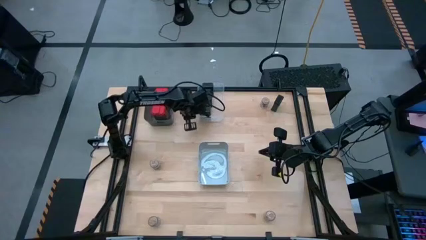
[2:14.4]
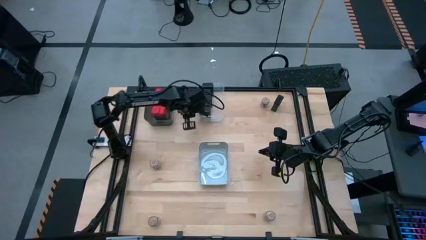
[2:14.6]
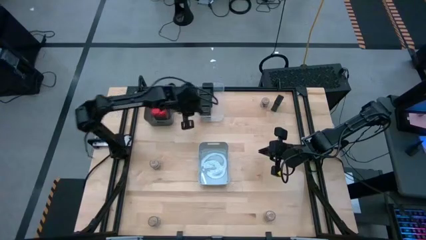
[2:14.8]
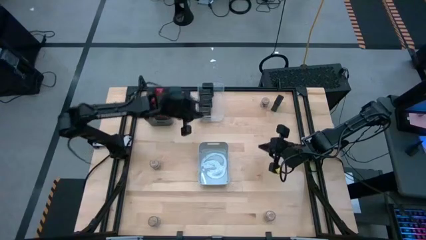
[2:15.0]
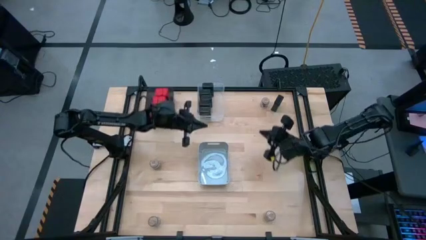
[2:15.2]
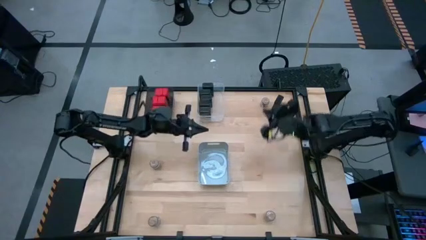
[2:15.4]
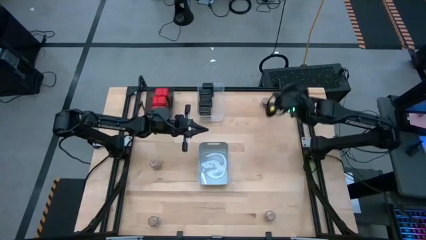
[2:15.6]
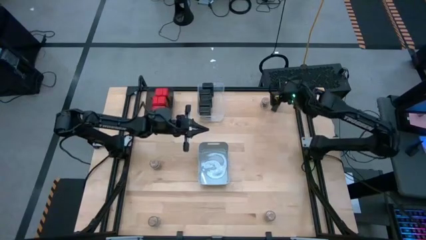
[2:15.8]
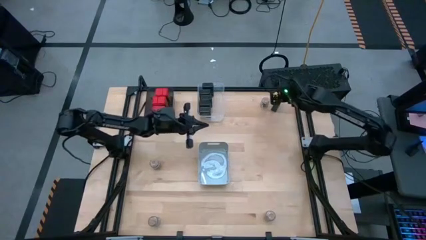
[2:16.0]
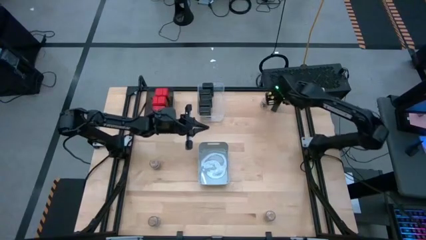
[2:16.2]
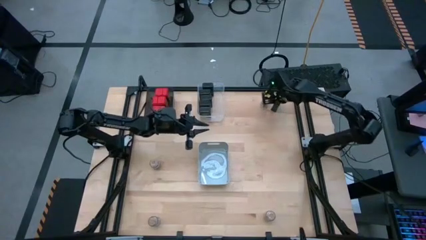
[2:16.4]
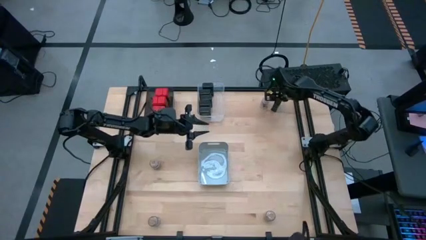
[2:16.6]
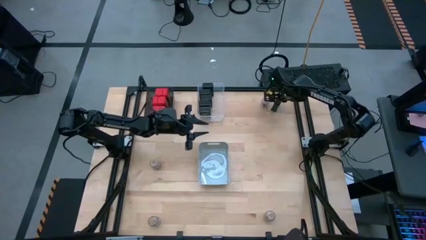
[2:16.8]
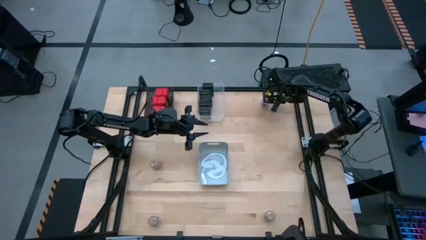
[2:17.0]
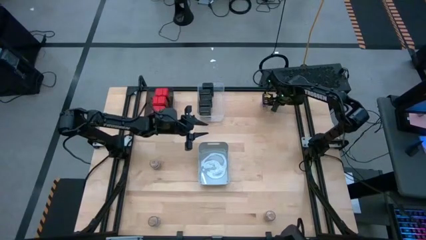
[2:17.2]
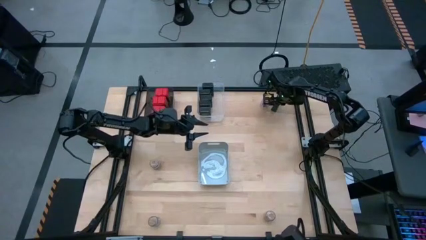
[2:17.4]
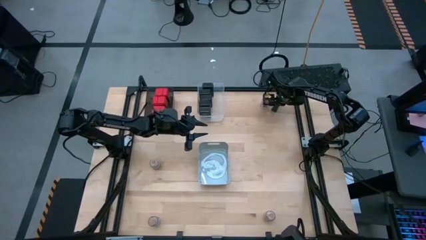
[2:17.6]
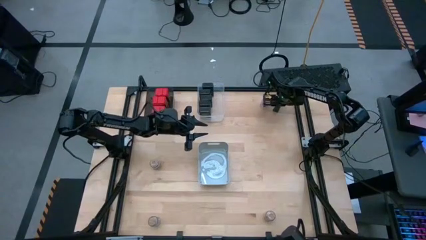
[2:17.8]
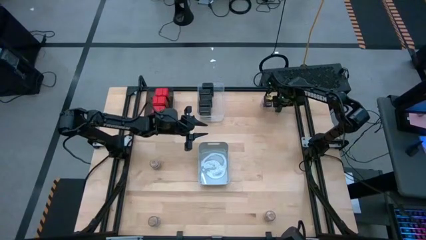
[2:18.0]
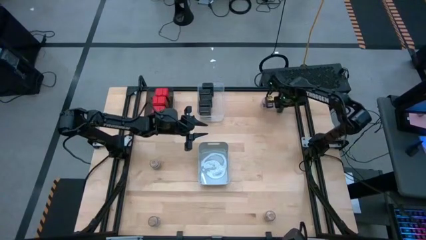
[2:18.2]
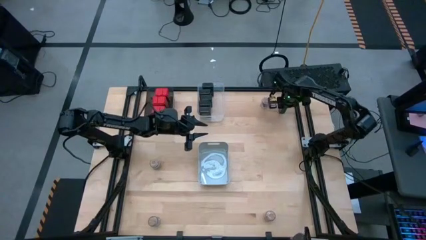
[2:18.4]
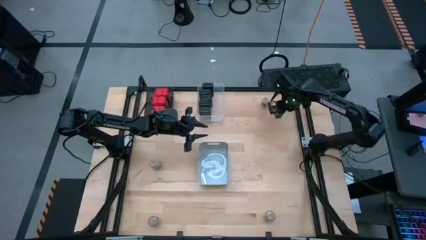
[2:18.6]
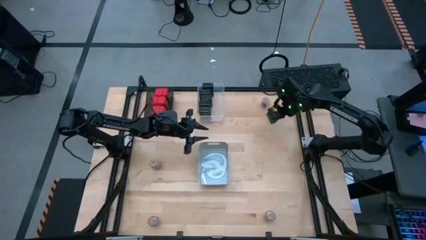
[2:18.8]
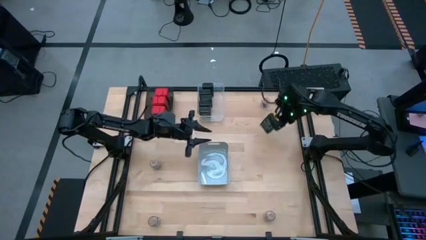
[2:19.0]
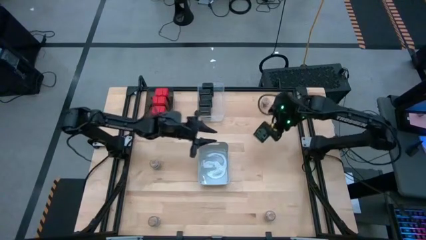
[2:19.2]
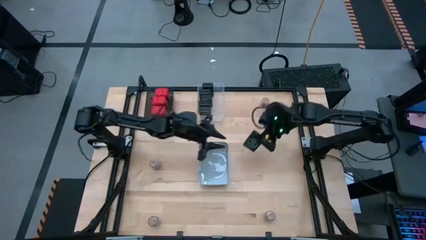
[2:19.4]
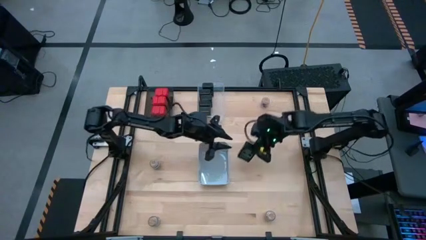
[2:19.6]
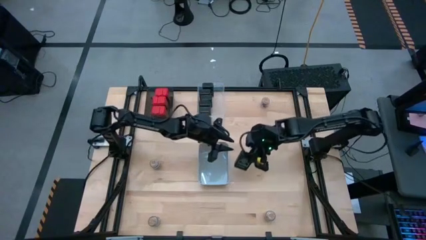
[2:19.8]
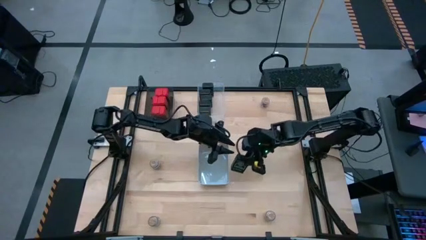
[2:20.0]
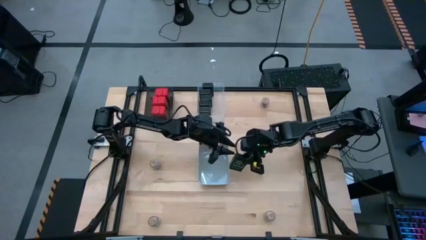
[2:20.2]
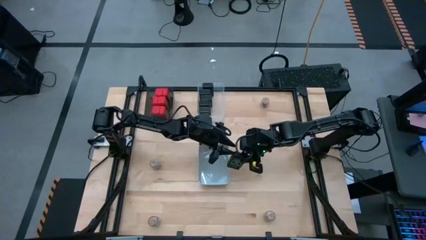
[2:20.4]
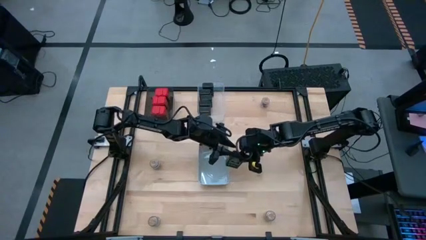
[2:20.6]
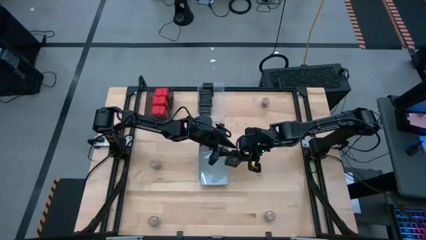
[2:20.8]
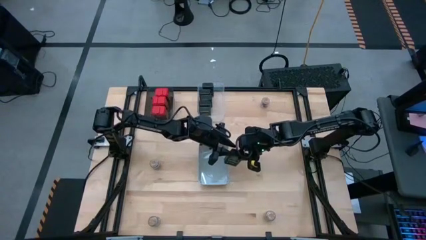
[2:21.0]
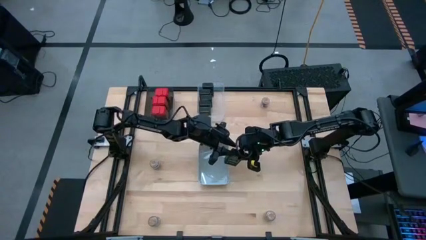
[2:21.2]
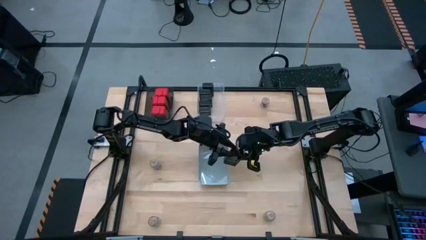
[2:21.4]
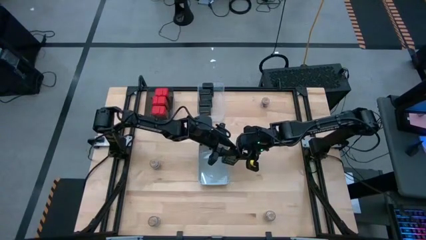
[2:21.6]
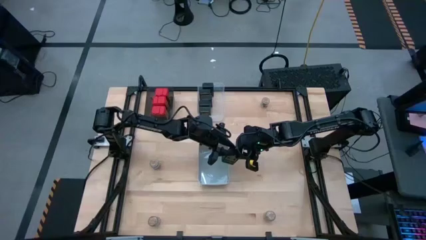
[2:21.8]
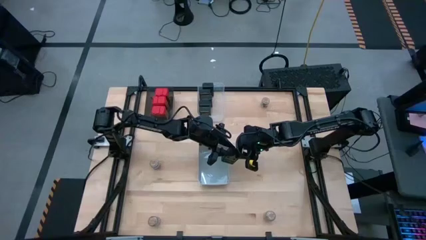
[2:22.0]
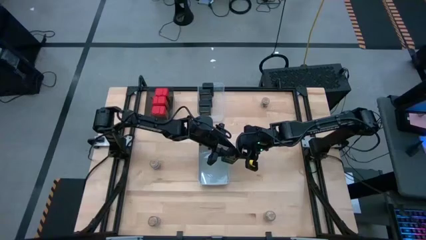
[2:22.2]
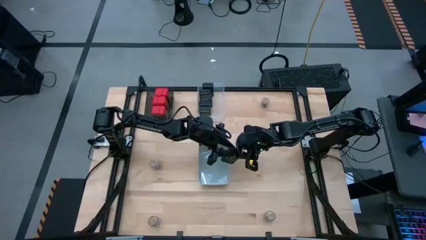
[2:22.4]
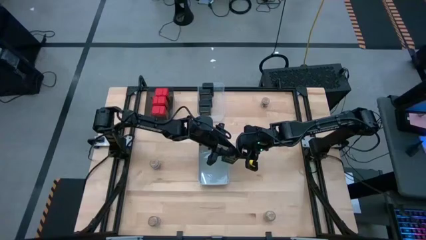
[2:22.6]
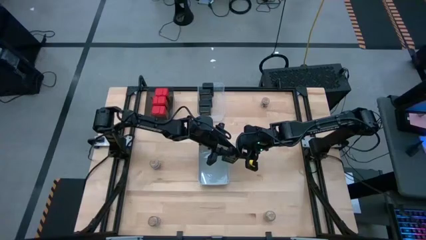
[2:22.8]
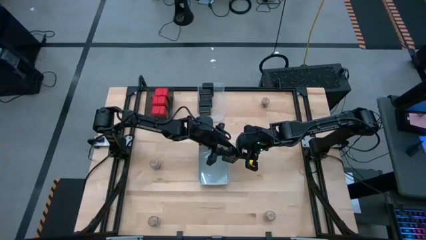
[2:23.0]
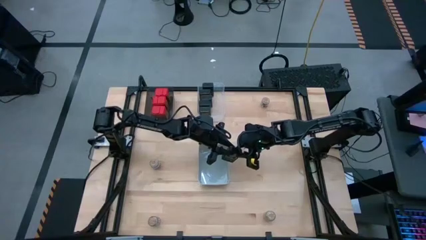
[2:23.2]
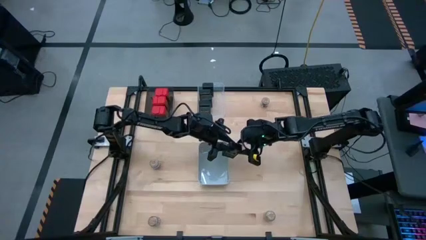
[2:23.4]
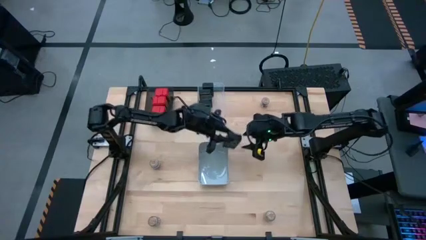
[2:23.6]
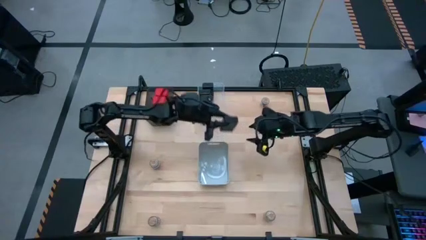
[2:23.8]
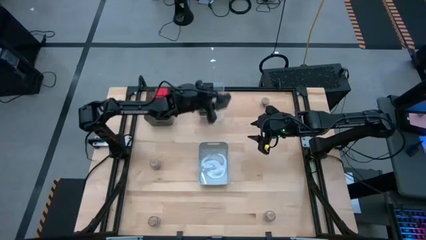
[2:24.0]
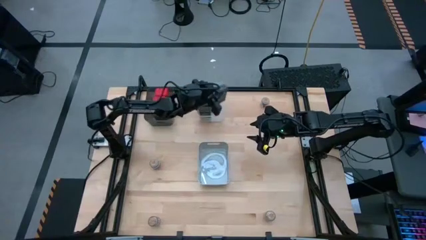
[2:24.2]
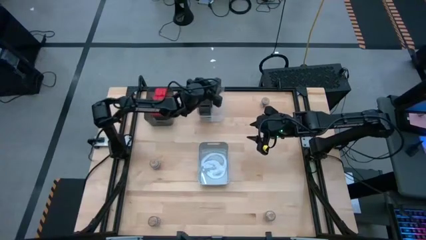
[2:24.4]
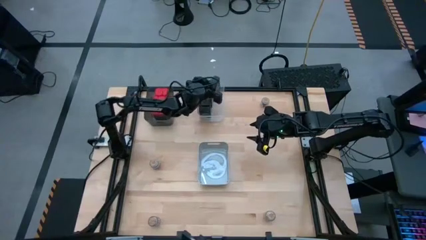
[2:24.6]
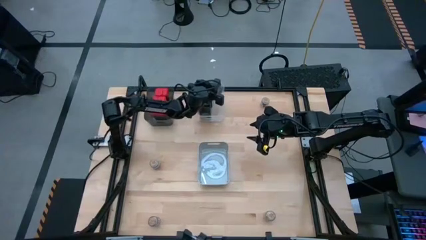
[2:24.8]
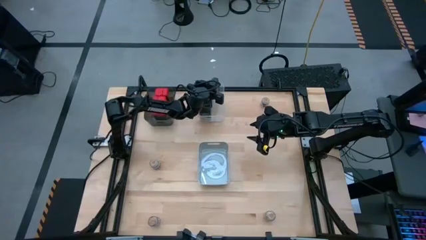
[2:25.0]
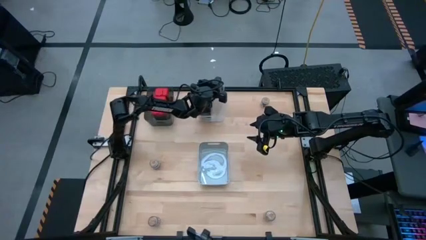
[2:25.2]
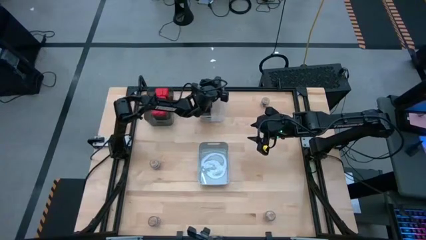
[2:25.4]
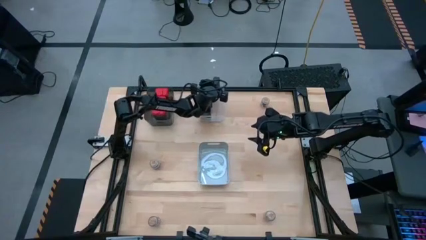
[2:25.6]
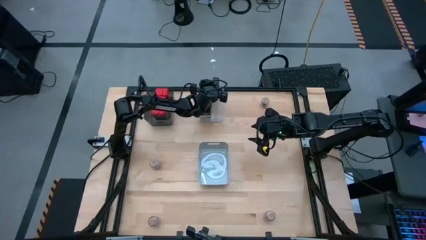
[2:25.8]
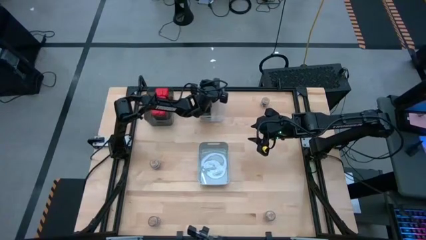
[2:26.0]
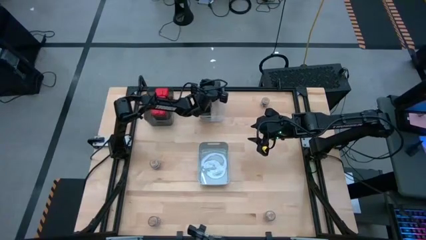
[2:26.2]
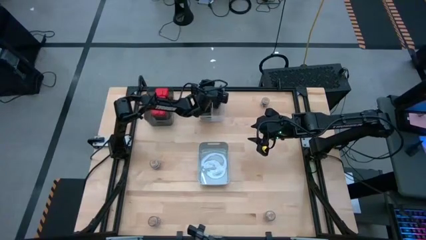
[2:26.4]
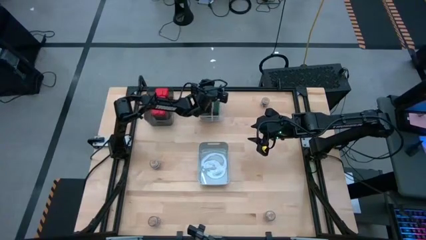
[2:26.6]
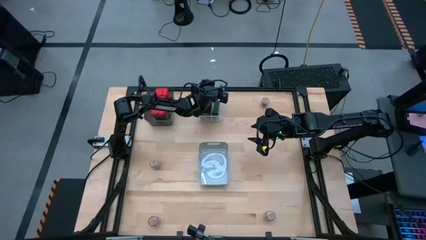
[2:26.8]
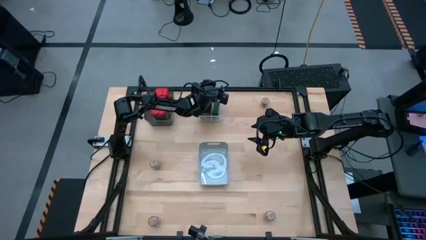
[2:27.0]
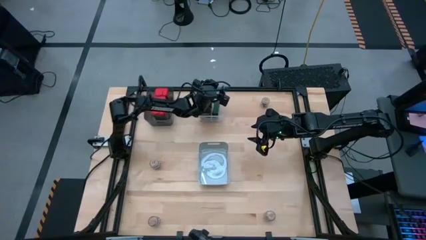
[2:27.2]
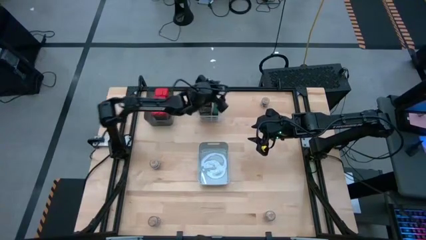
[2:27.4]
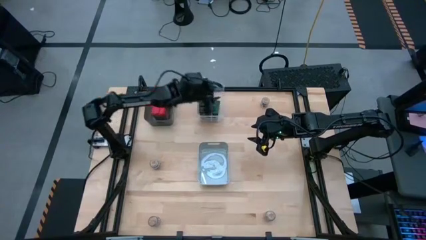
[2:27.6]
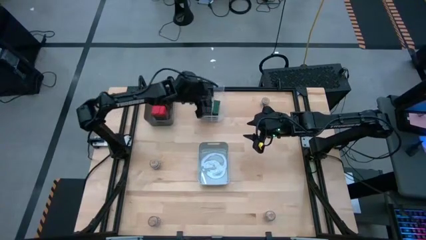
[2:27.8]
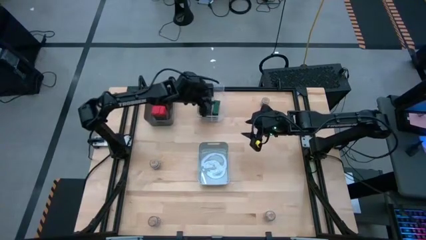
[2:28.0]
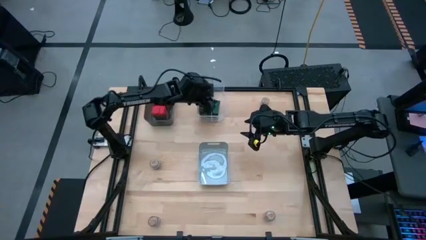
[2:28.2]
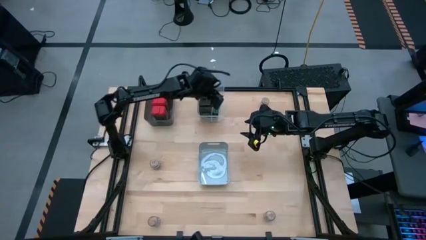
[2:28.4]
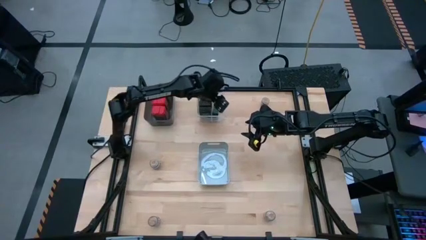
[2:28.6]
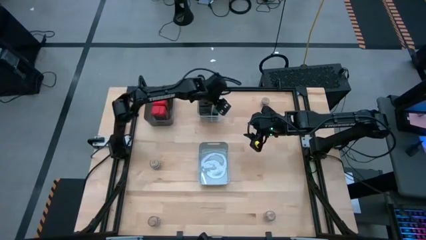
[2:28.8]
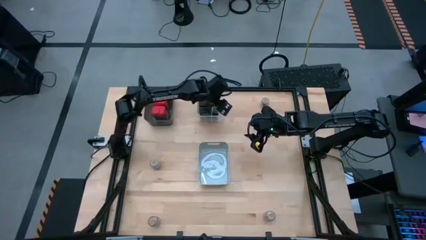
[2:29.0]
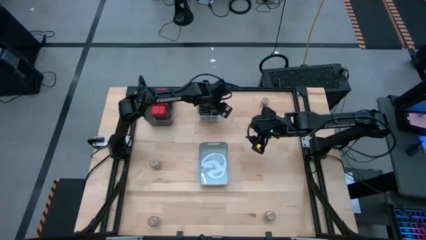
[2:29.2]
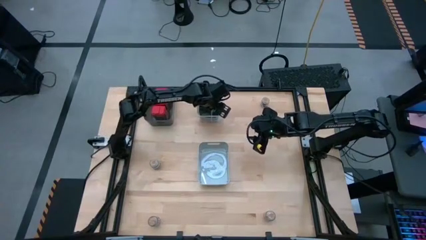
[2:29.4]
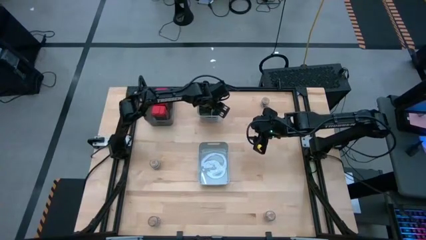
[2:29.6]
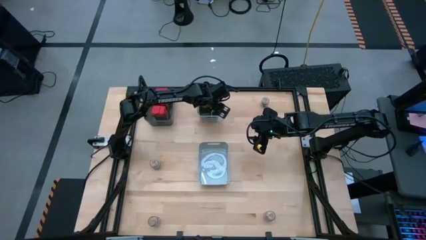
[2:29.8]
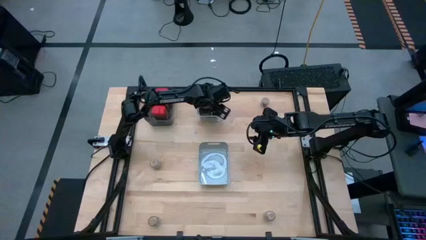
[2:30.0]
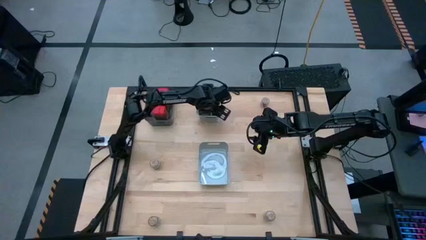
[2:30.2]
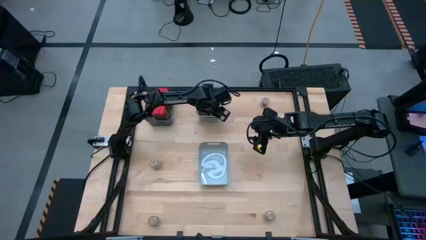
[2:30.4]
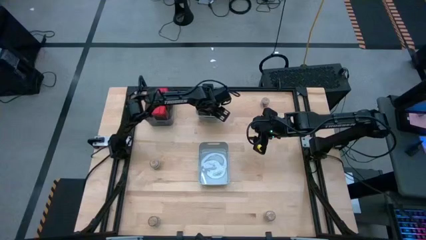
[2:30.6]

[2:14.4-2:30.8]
Task: Sort spices by type
Put the black seasoning can into the transparent bin

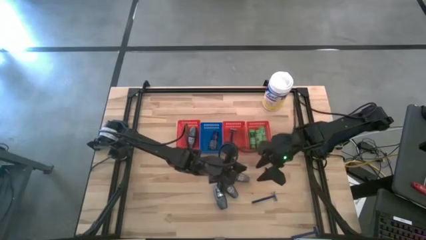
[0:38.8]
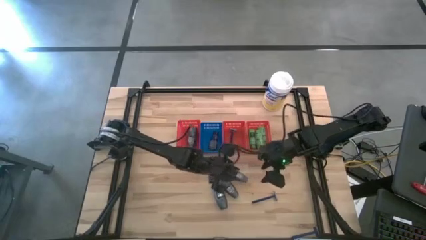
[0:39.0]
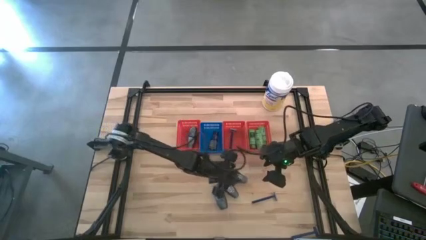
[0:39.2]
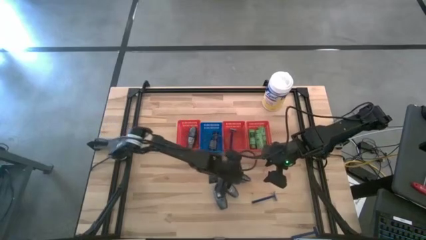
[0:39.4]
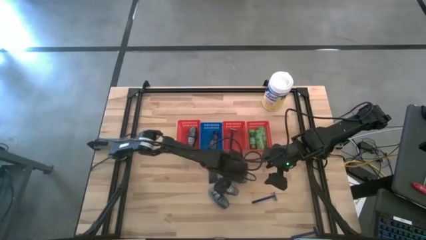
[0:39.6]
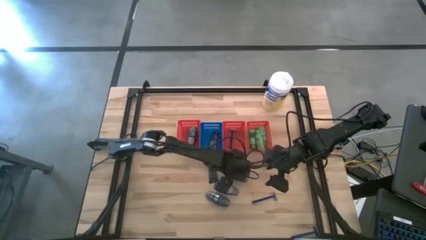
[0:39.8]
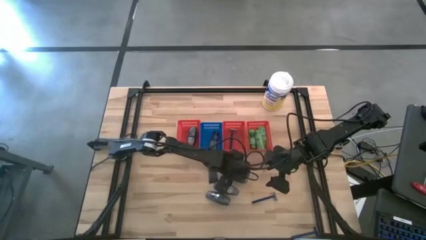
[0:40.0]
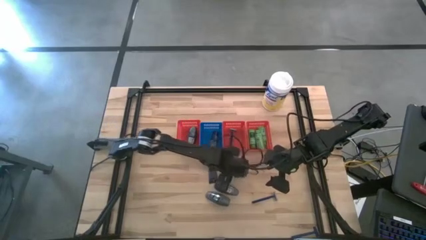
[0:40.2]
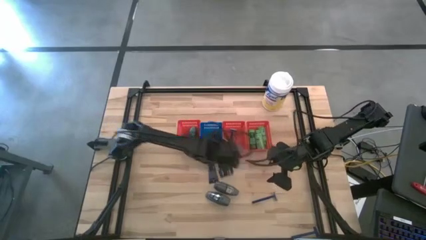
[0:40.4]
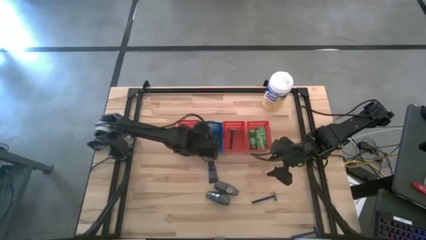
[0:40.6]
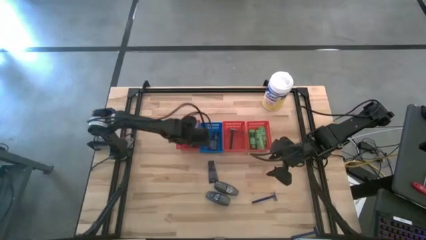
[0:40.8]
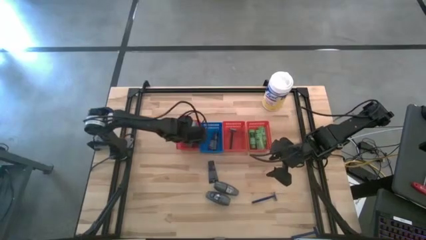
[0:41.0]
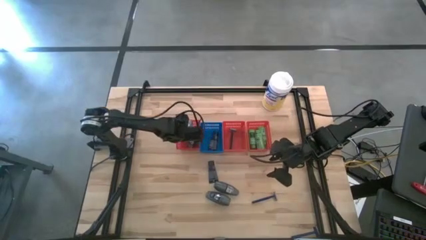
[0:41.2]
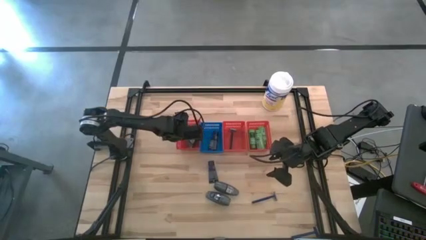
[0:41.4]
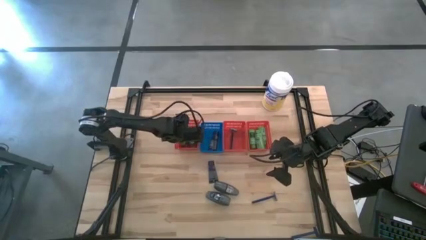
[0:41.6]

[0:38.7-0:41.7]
Task: Pick & Place Travel size toiletries
Put the black deodorant into the left red basket
